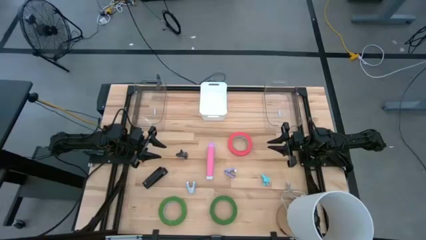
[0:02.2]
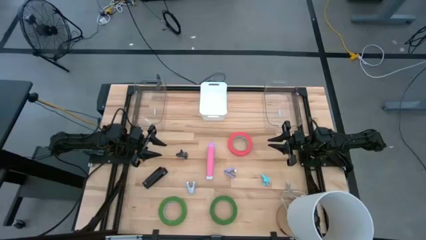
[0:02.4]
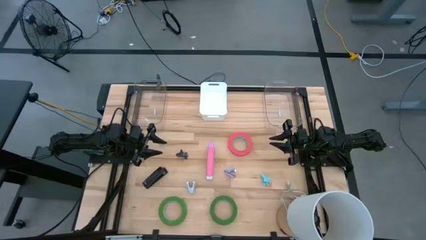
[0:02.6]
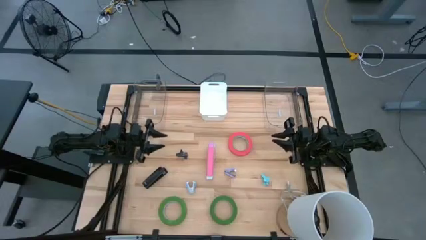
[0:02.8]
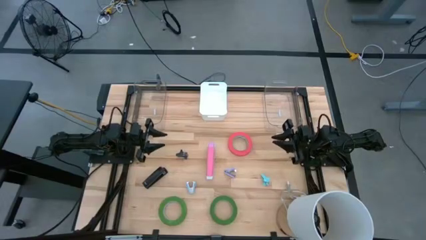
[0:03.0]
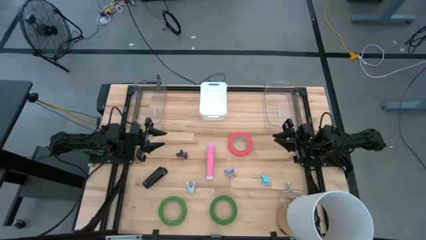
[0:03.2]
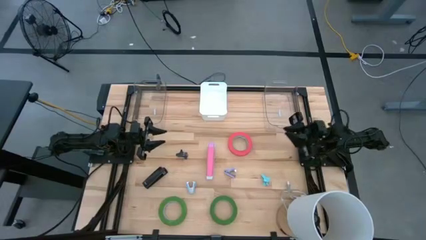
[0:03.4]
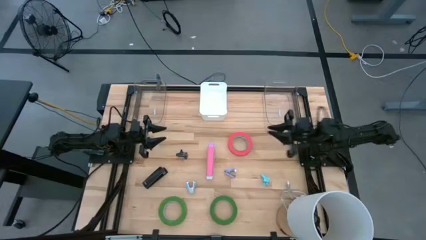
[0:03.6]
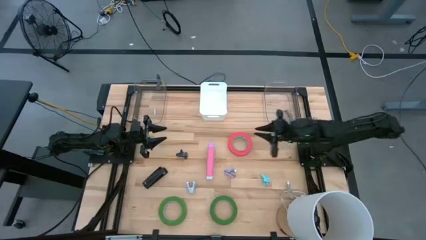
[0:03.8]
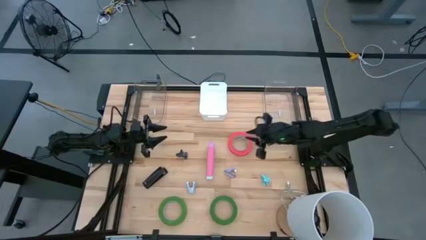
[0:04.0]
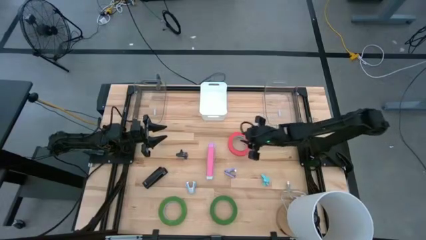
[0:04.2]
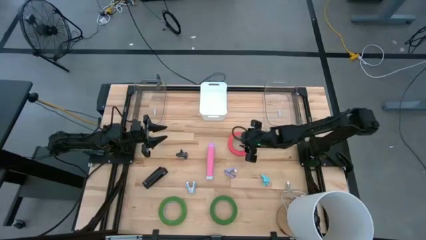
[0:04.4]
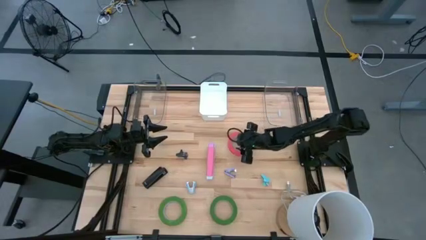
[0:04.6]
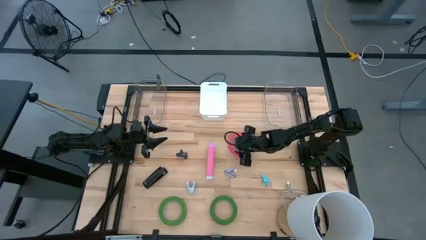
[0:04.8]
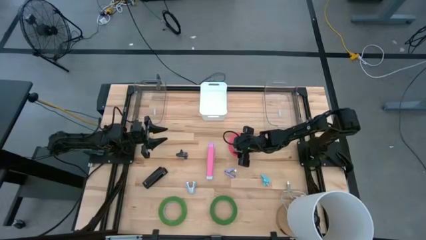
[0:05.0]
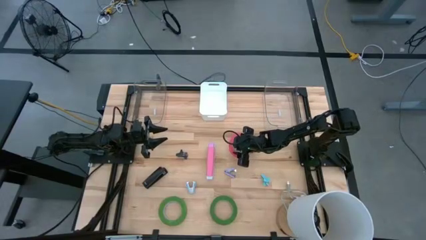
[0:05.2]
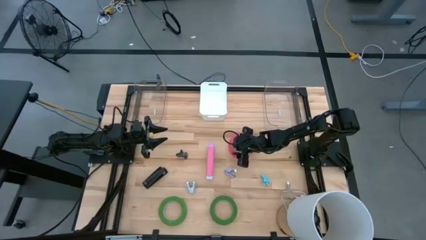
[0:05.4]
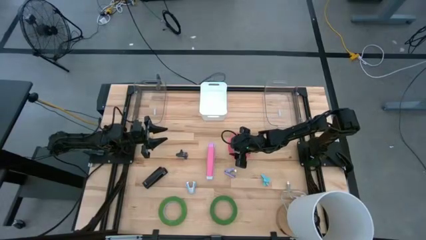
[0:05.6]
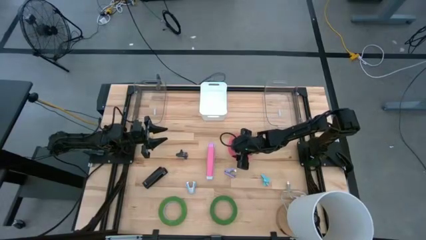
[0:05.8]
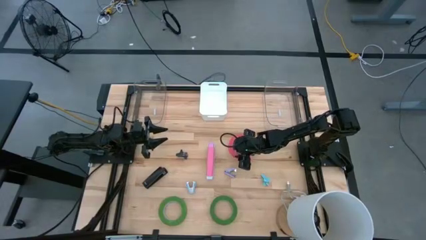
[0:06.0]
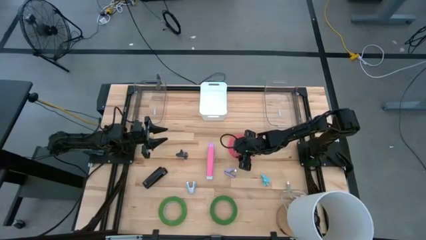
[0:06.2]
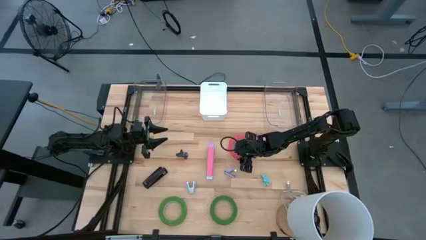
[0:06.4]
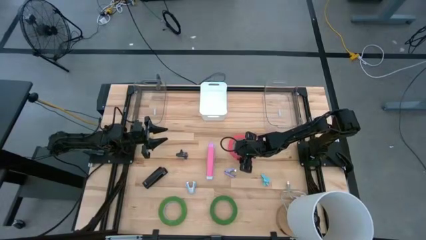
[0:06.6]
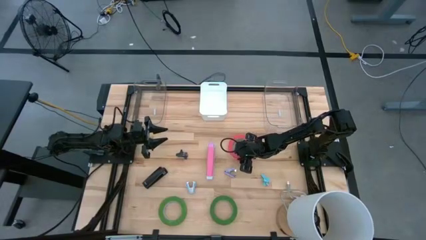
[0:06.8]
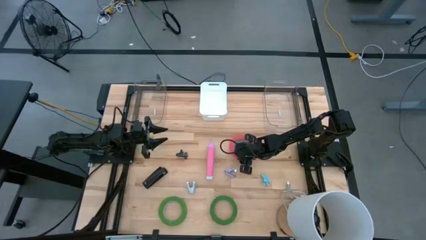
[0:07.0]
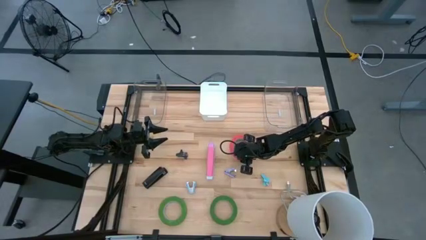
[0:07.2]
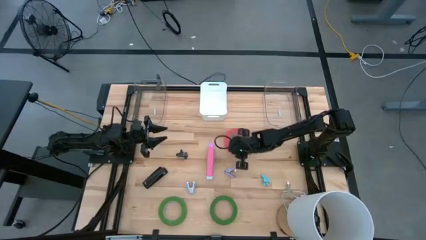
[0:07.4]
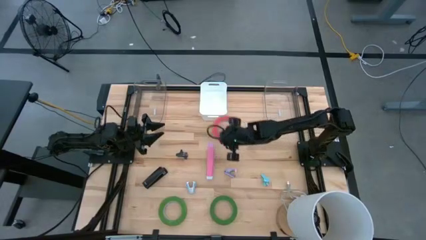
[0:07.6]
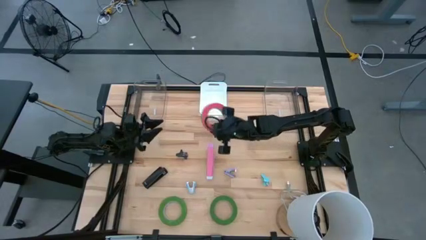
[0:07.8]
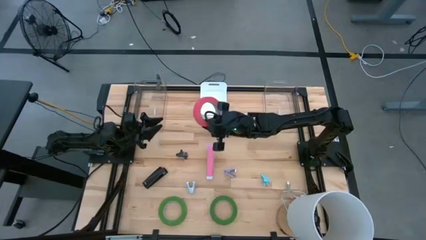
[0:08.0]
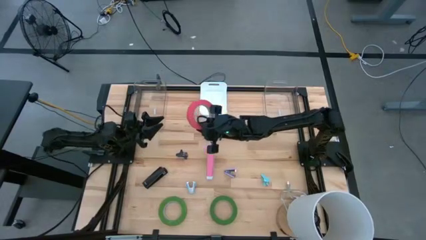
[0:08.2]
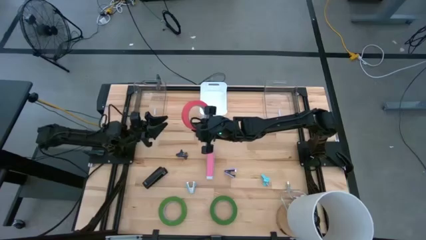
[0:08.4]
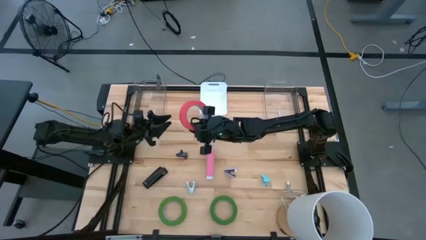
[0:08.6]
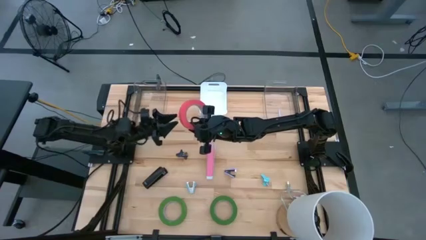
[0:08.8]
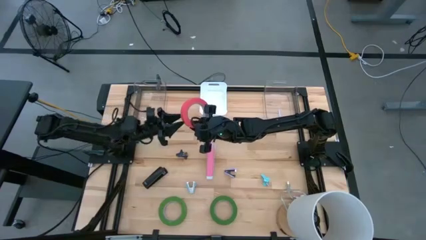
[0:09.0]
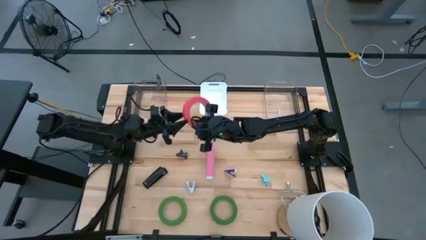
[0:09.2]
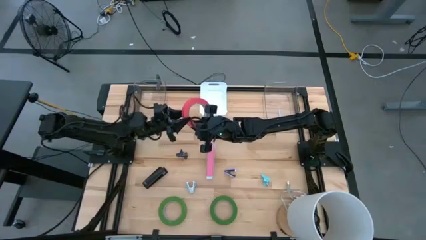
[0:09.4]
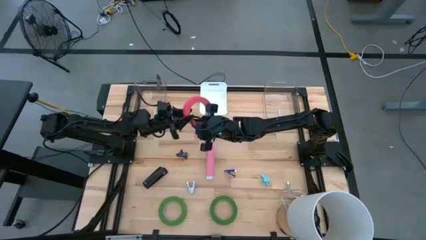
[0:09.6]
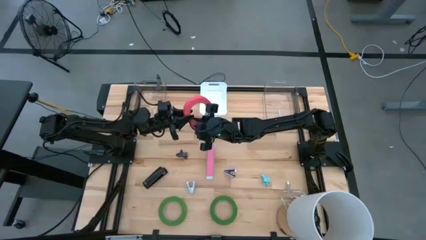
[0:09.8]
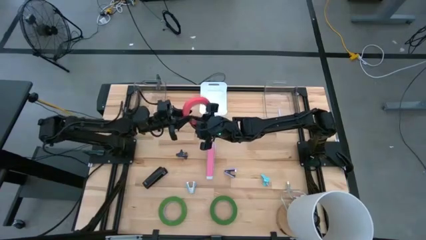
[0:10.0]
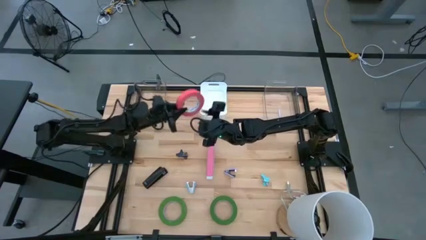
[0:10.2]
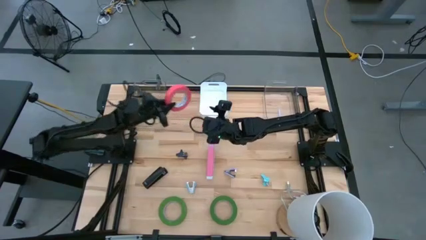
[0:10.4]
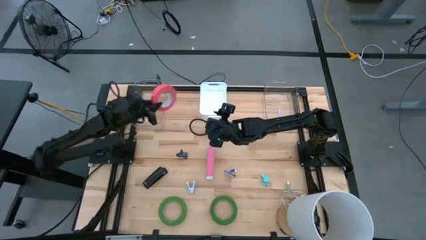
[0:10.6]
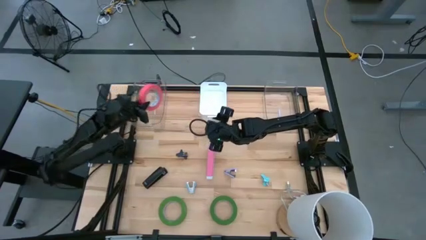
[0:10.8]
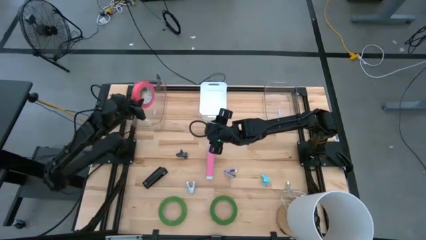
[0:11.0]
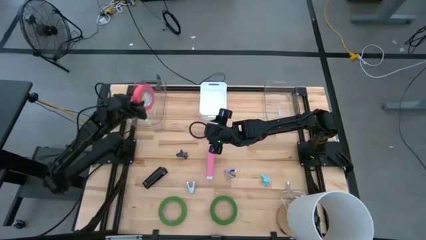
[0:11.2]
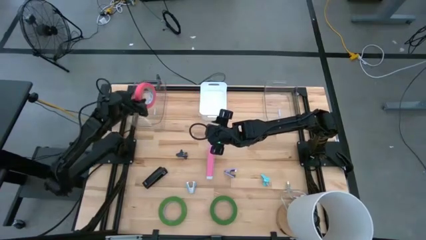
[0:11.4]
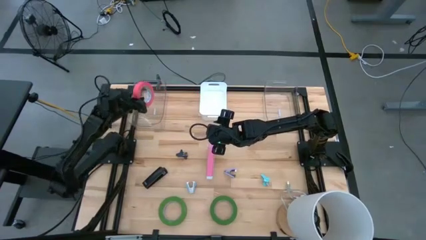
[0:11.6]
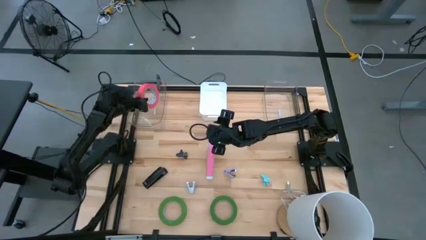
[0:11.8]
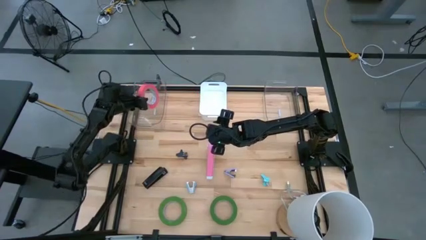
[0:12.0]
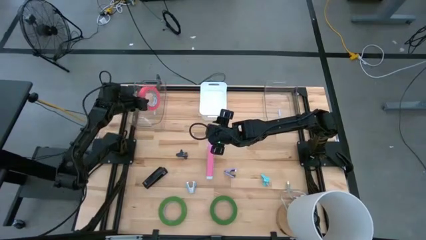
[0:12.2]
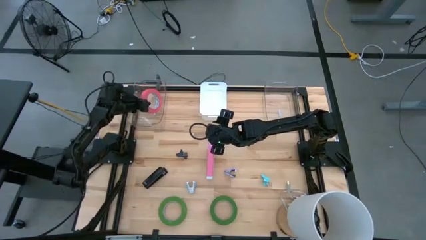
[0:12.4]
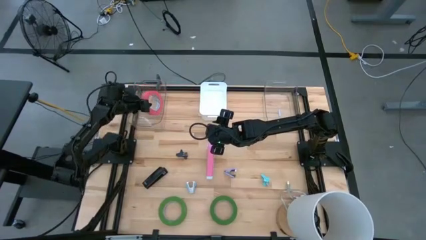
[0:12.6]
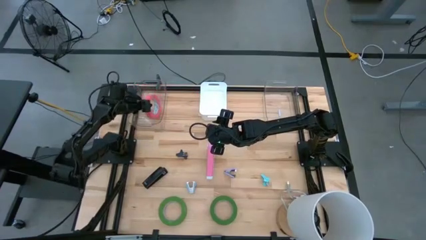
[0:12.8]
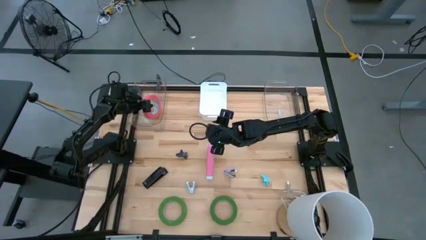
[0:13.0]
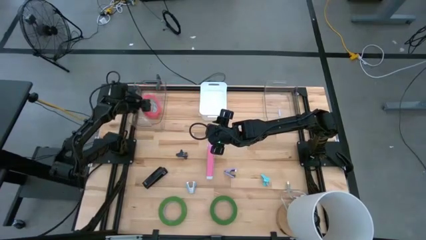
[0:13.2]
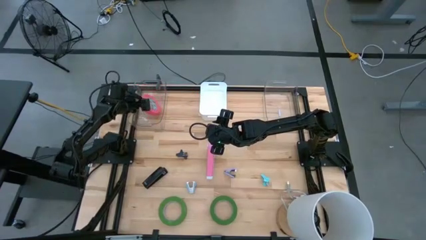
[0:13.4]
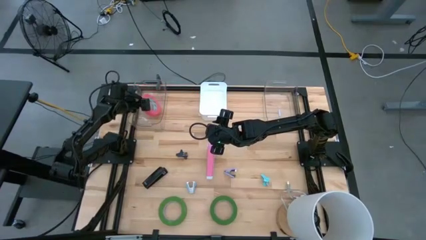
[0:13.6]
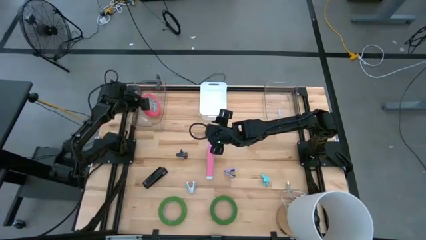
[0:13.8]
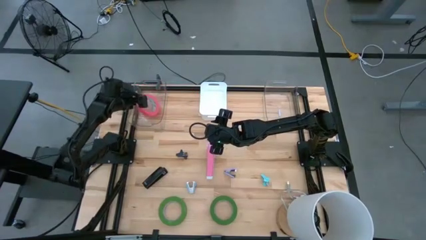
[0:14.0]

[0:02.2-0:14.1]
Task: Pick and place Stapler, Stapler remover, tape
Put the pink tape into the left transparent bin
